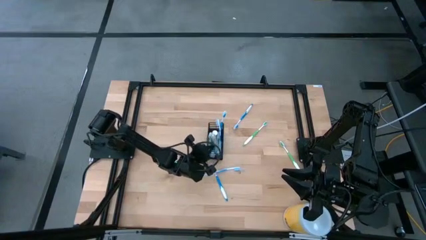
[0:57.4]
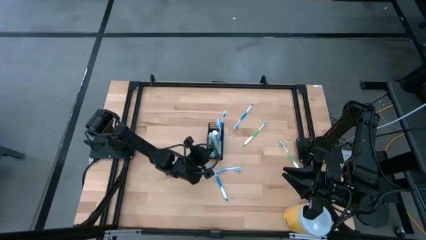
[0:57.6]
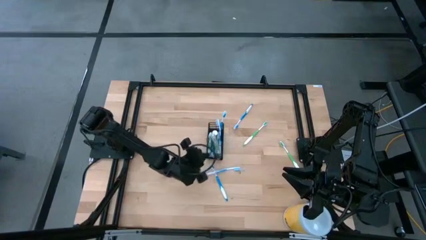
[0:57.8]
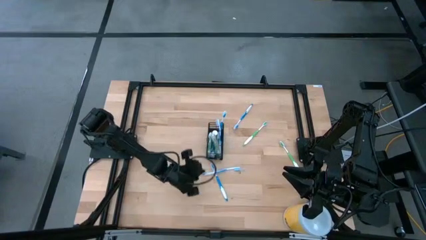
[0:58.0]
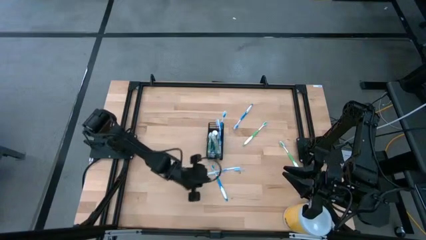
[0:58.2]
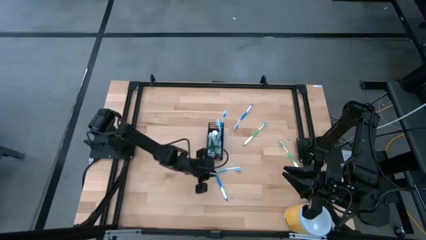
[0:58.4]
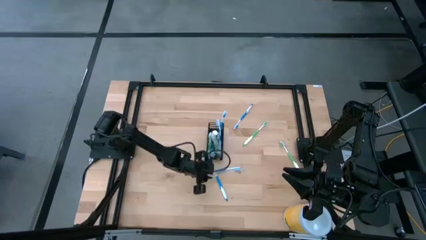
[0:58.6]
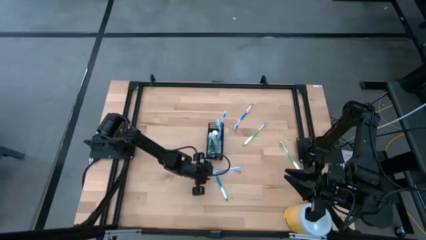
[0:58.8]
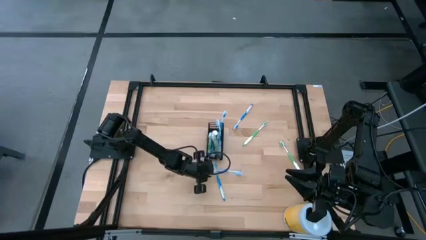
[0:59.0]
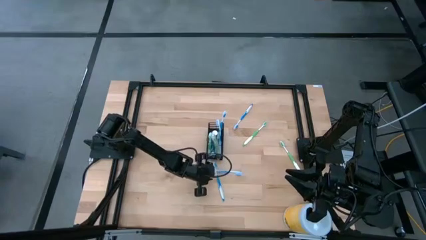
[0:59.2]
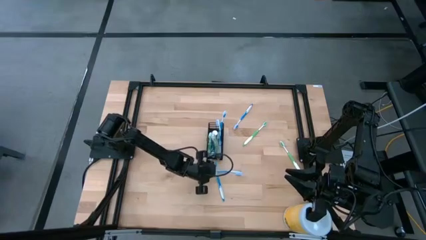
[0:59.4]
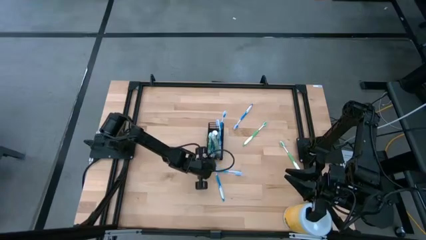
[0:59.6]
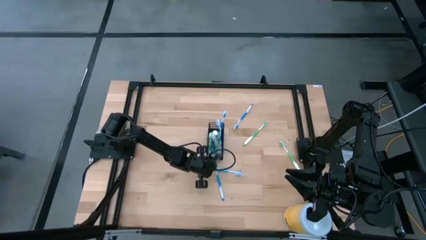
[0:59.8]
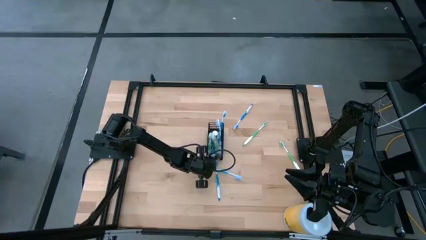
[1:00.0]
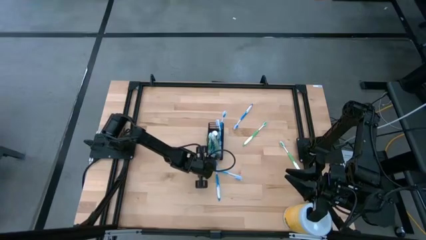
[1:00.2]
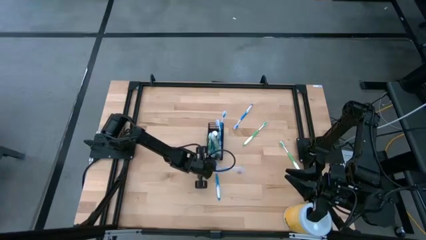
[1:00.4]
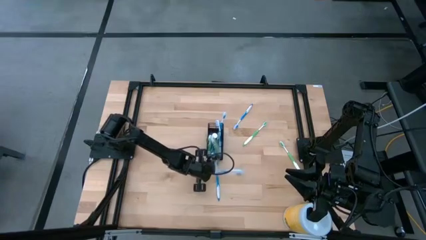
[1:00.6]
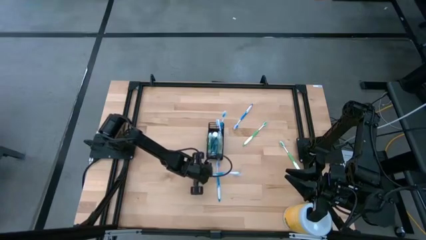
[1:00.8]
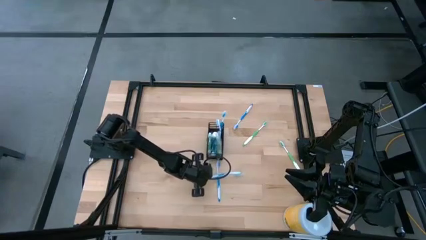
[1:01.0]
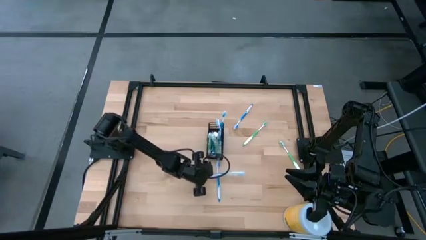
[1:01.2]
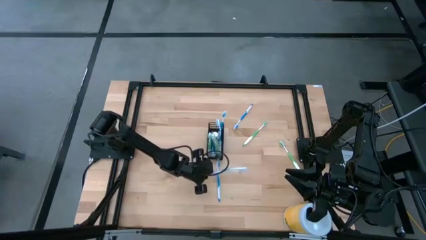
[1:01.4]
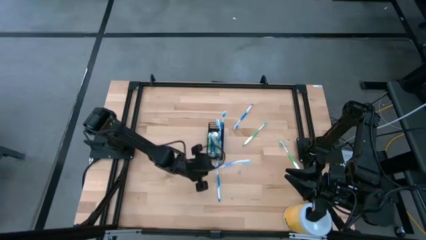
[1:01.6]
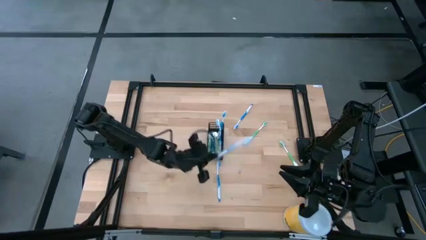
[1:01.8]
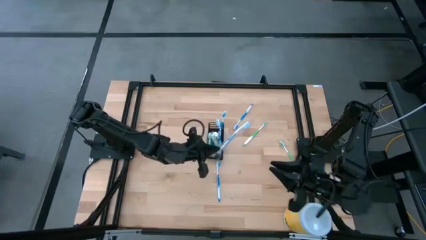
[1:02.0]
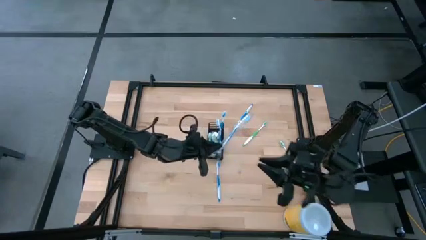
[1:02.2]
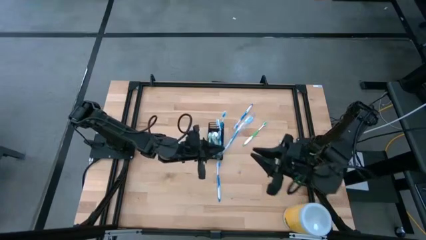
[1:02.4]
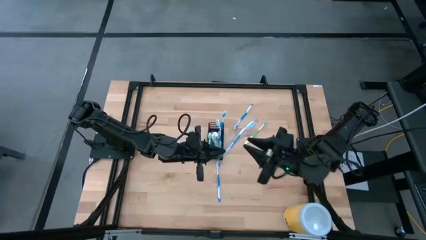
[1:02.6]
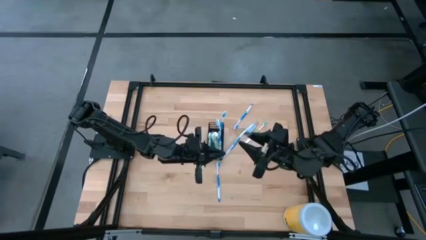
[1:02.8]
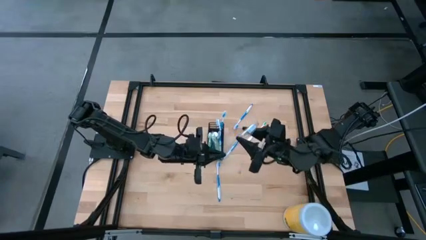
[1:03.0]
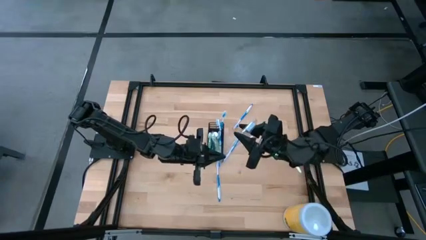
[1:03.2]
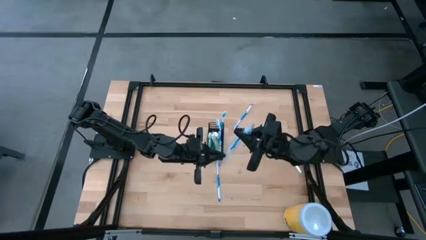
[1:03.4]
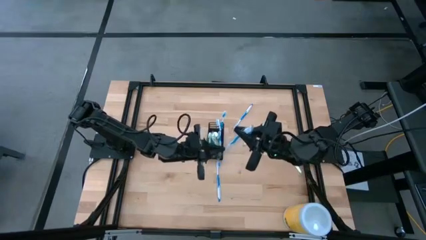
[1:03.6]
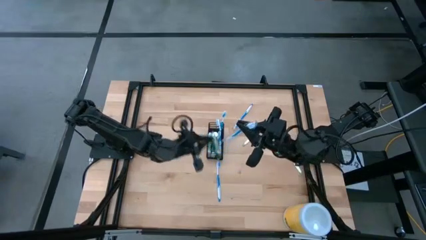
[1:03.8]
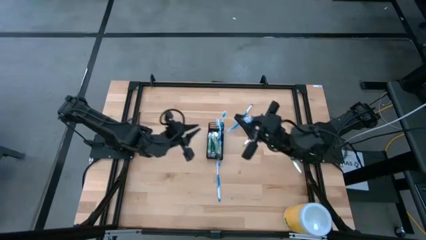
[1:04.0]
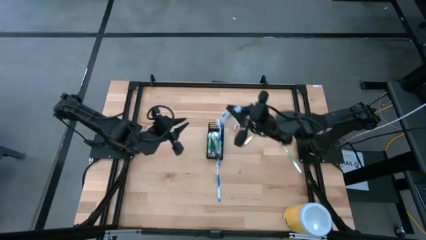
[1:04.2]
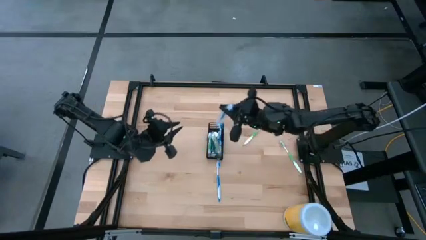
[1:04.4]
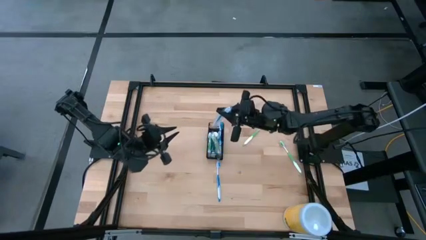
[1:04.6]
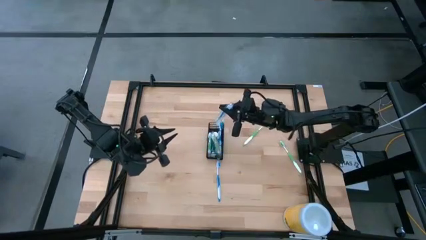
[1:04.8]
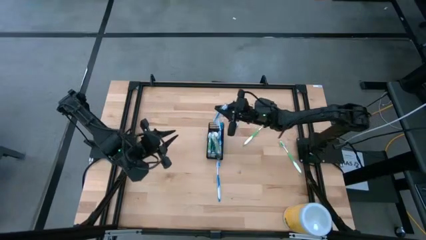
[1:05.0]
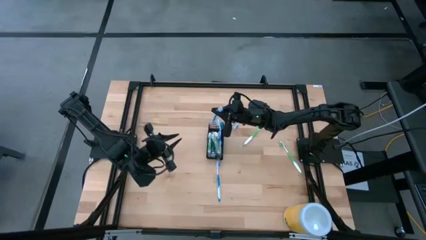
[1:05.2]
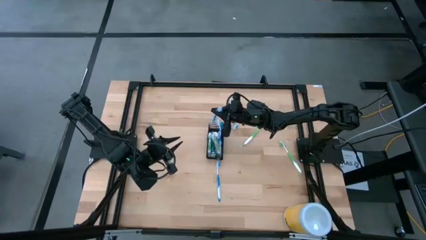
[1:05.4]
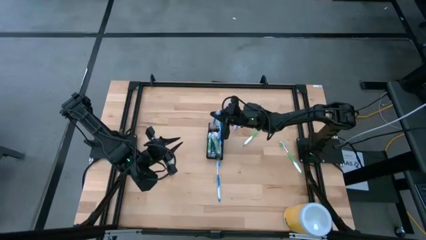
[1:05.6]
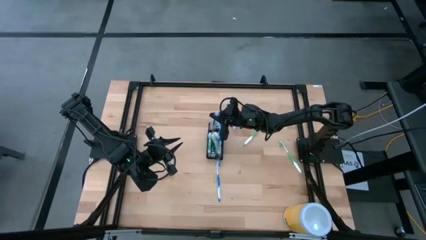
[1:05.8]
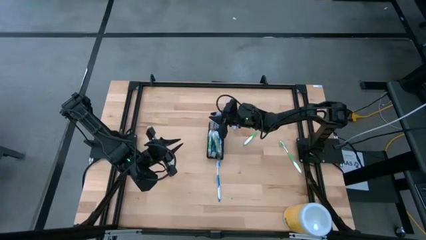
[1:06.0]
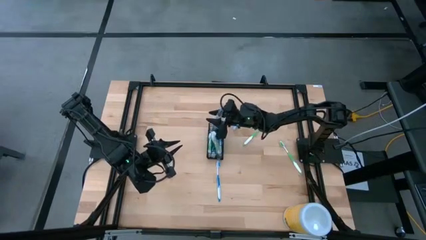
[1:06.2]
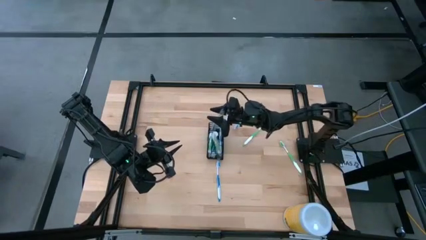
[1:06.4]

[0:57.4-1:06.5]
Task: Pick & Place toothbrushing station
Put the blue toothbrush into the black organizer

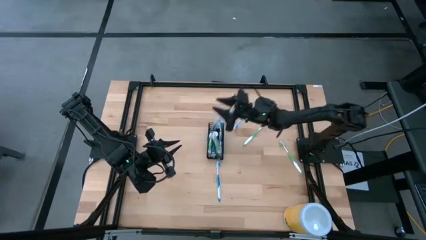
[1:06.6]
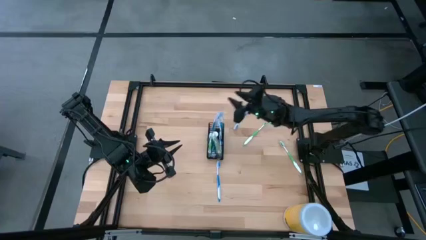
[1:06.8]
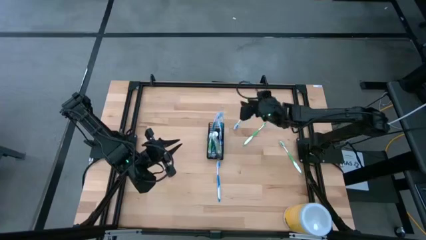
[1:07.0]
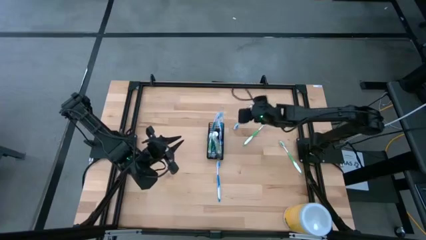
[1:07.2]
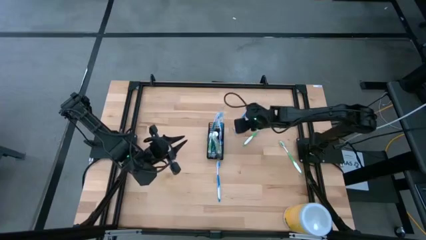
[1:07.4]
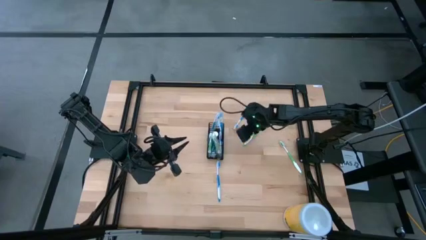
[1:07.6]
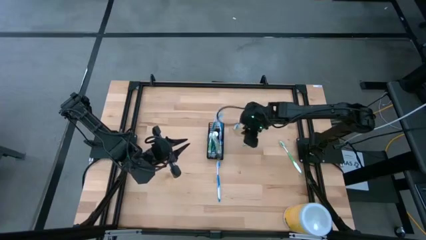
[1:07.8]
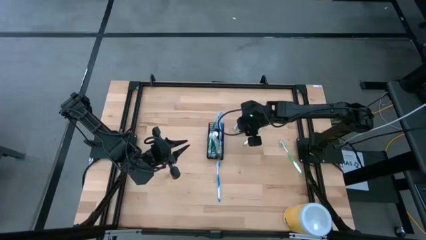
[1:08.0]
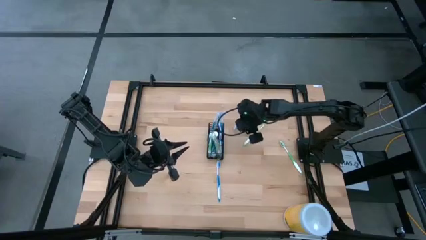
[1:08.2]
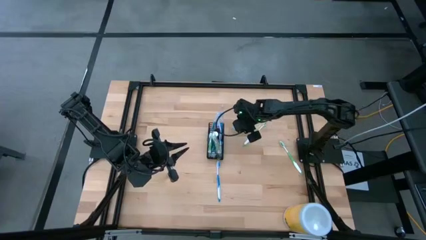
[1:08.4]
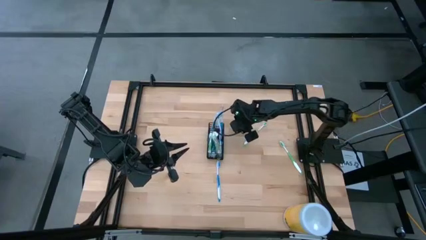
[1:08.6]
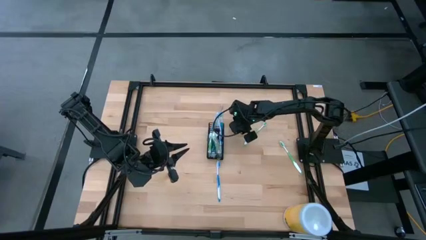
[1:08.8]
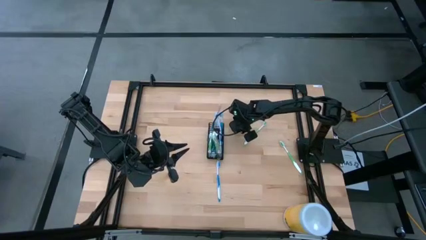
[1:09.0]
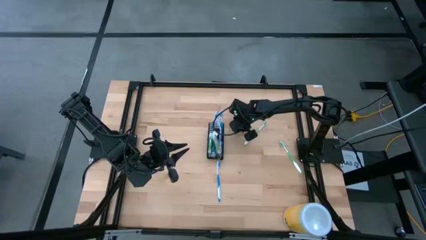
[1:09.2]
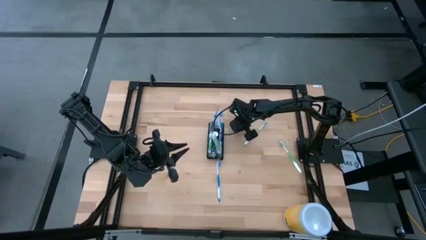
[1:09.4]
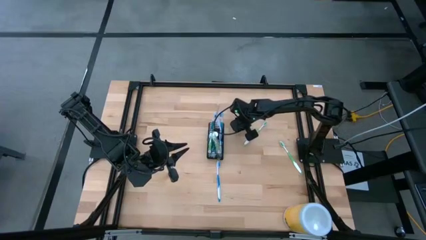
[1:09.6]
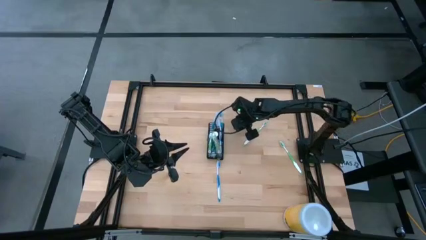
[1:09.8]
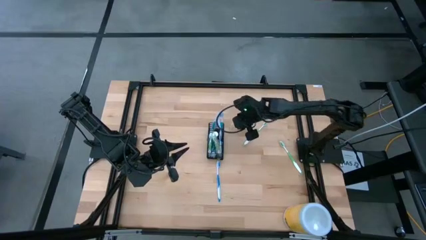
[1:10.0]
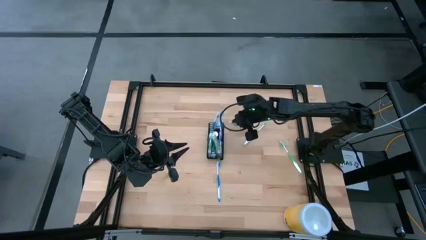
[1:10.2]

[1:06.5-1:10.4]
Put the blue toothbrush into the black organizer

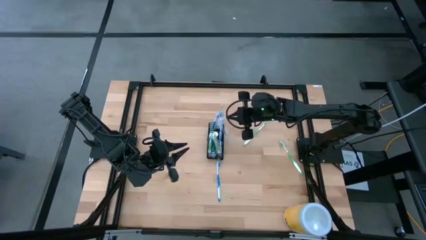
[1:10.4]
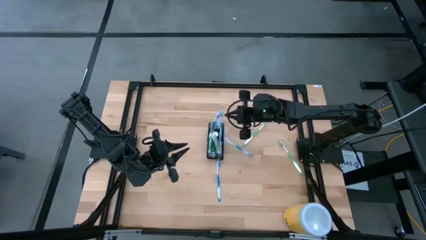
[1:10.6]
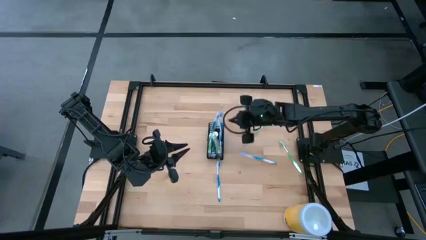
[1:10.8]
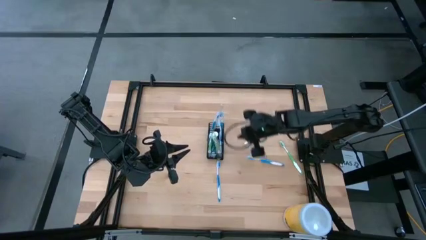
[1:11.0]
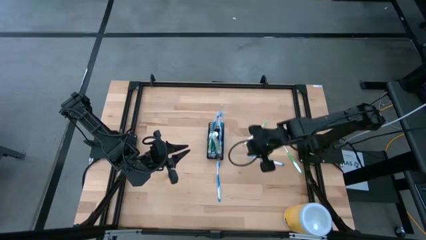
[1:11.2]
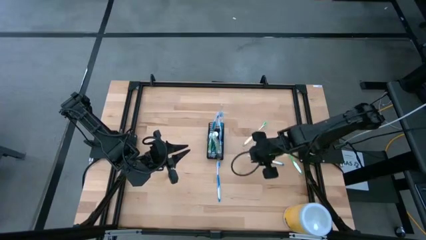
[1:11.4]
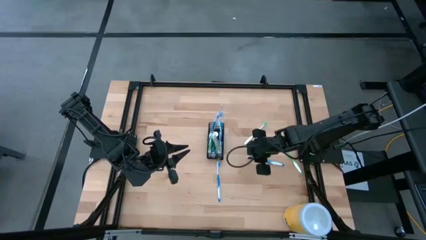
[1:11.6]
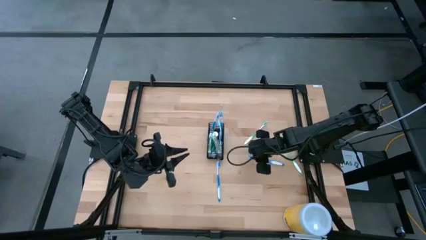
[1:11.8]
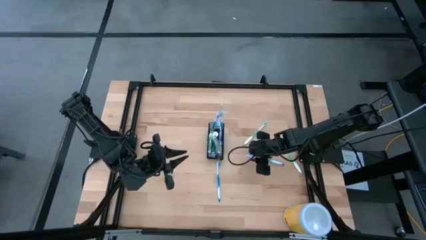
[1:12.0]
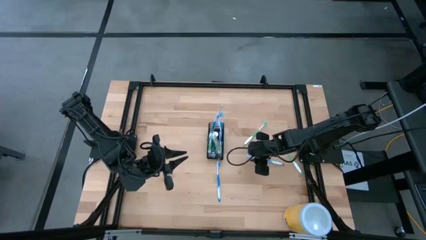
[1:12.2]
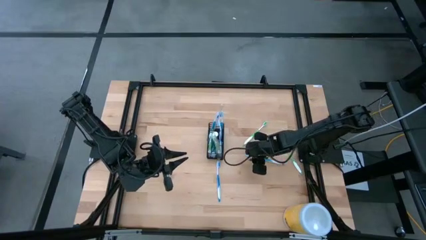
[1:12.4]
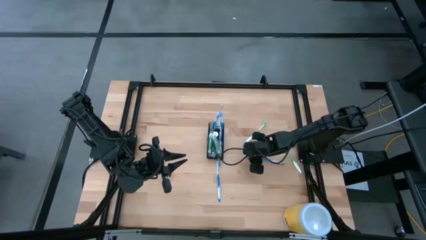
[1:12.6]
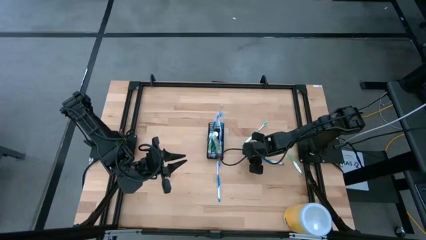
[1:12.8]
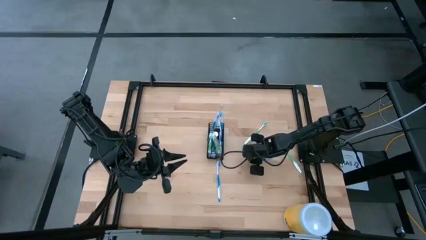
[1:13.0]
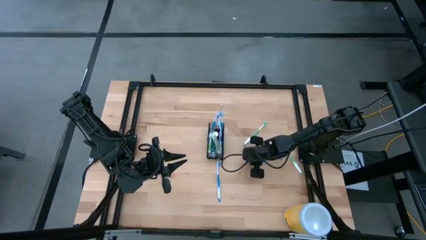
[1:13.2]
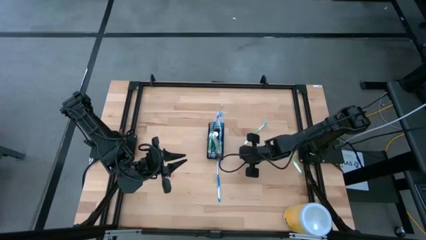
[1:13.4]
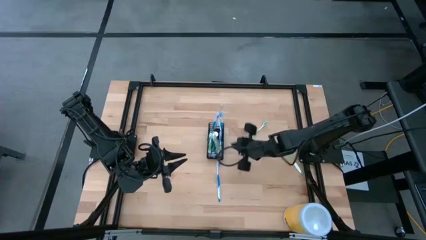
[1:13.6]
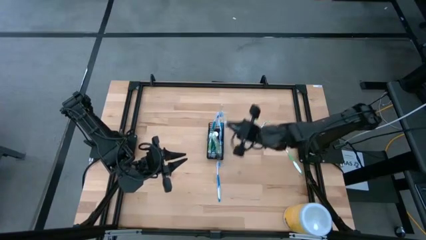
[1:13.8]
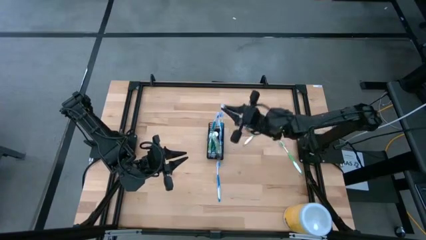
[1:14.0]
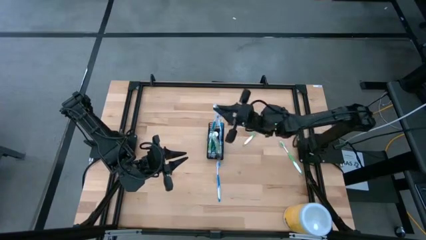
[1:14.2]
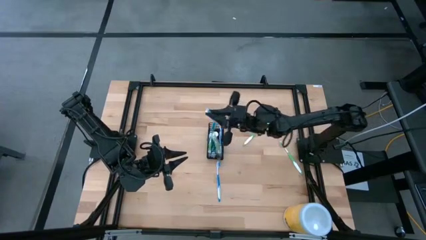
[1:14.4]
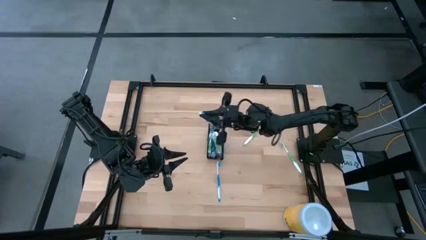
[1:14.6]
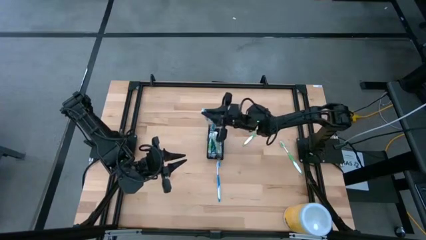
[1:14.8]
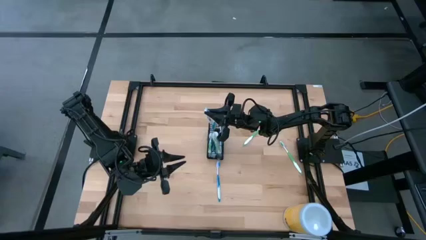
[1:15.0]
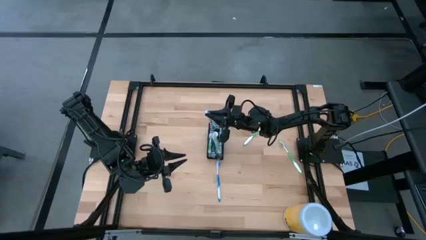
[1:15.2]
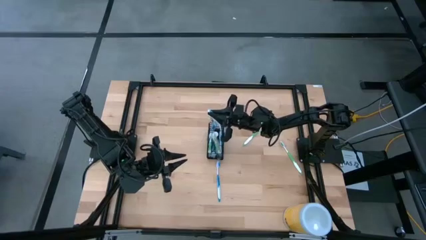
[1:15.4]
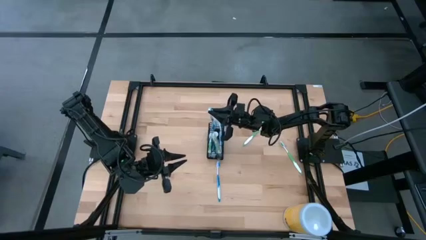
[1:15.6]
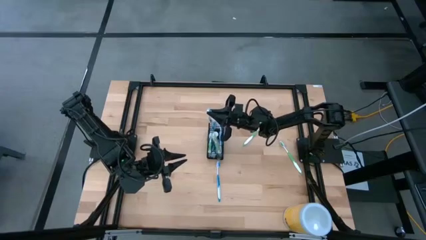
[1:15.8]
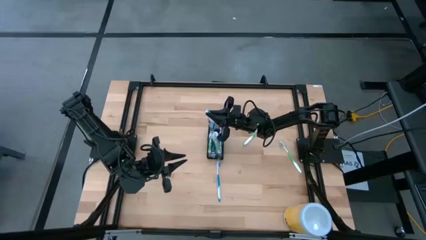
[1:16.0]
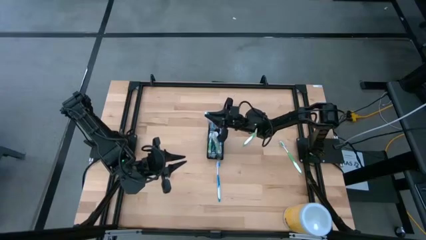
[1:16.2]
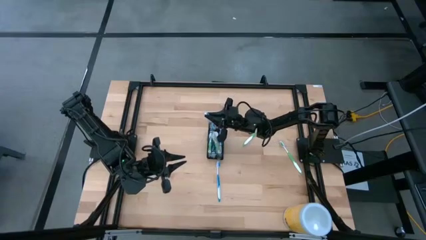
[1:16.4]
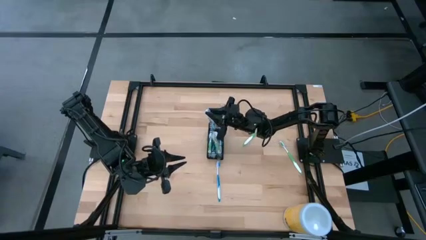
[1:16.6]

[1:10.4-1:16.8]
Put the blue toothbrush into the black organizer
